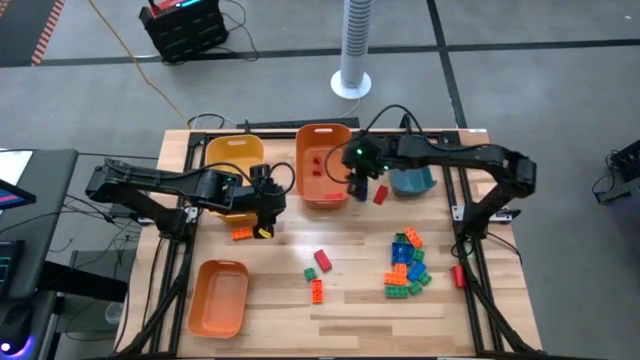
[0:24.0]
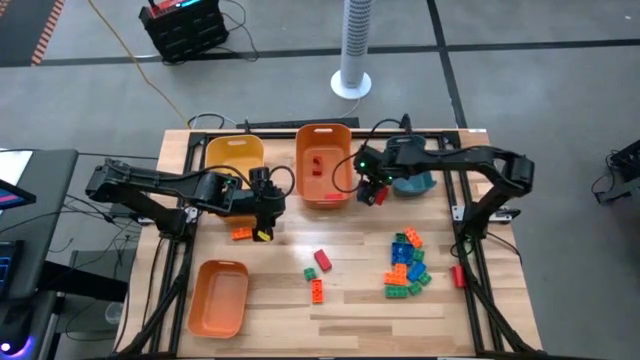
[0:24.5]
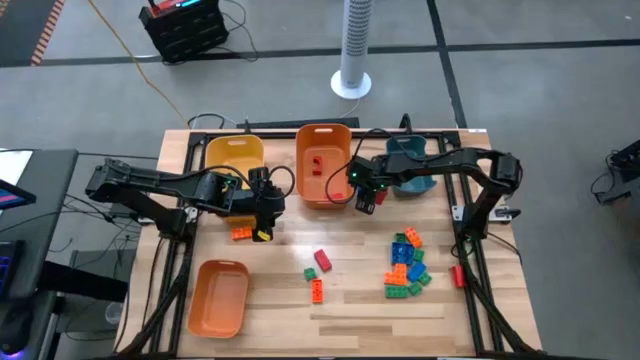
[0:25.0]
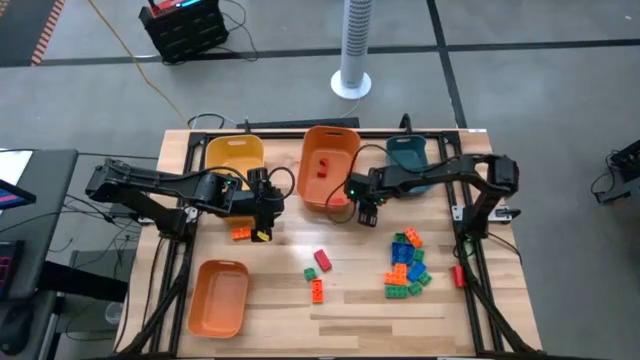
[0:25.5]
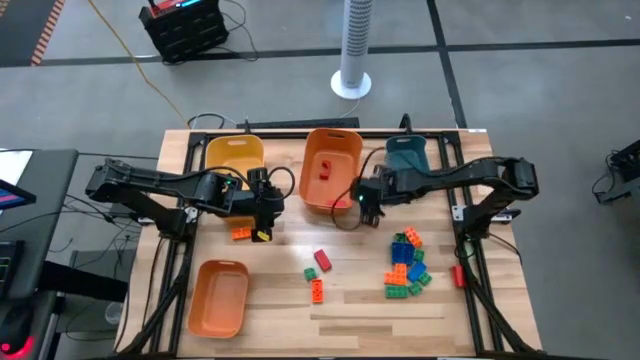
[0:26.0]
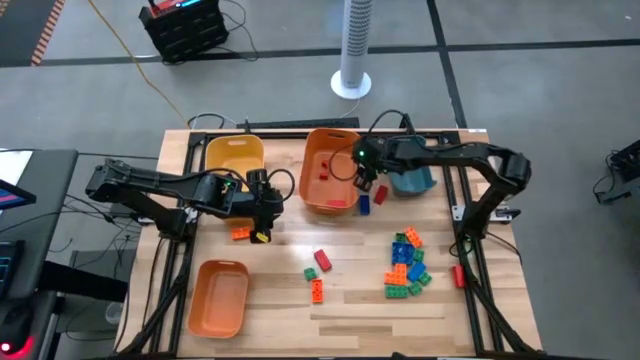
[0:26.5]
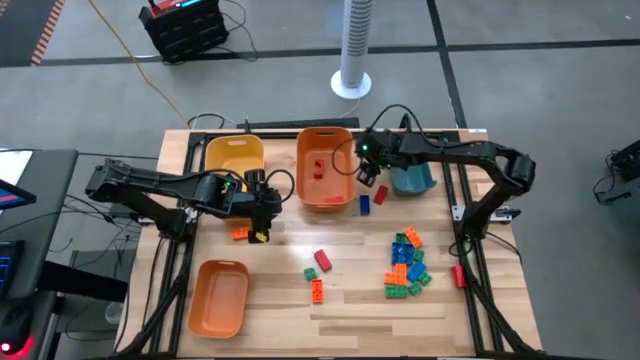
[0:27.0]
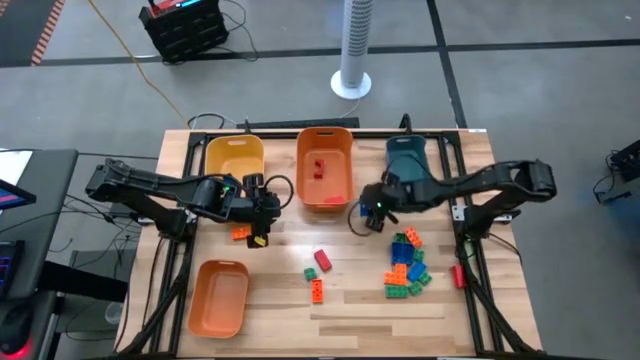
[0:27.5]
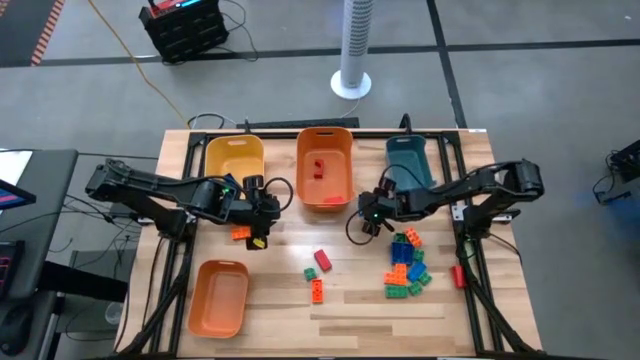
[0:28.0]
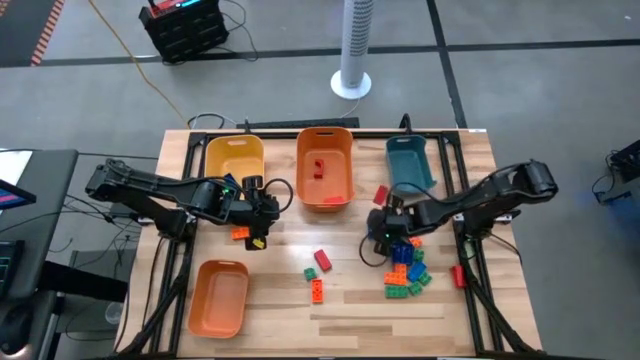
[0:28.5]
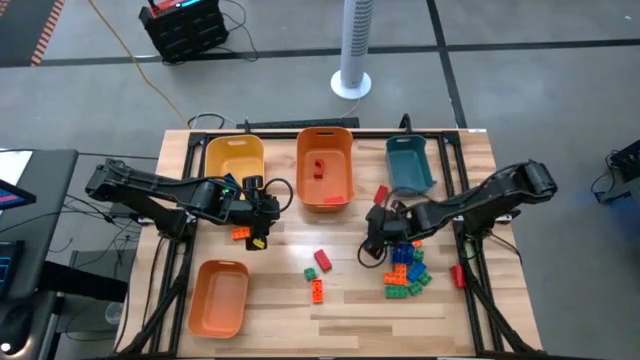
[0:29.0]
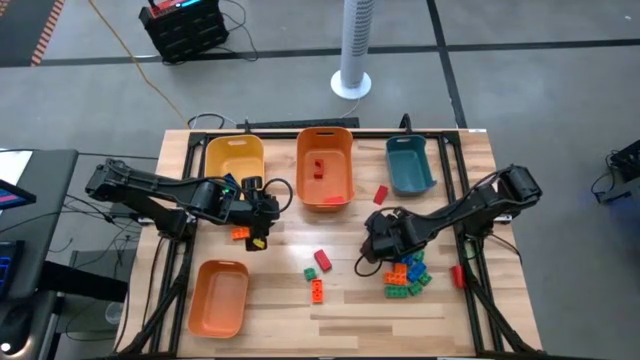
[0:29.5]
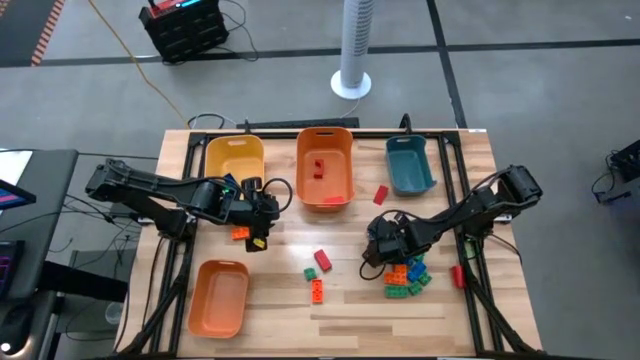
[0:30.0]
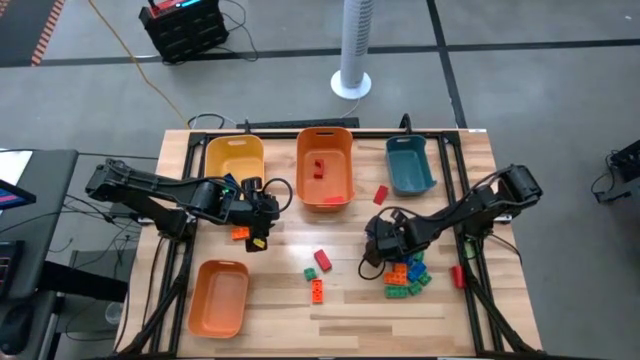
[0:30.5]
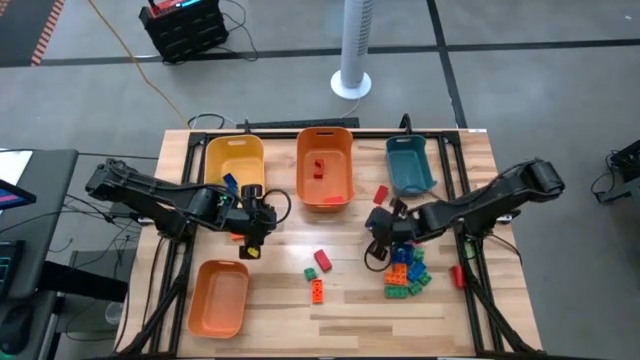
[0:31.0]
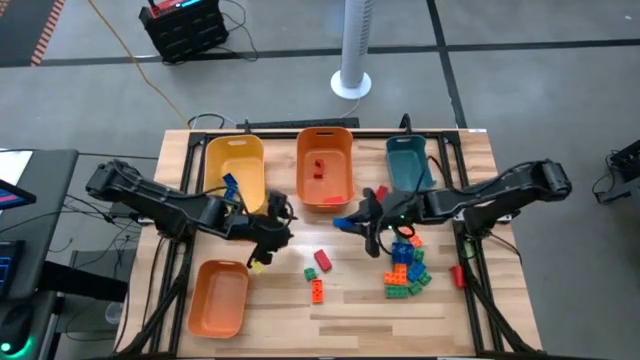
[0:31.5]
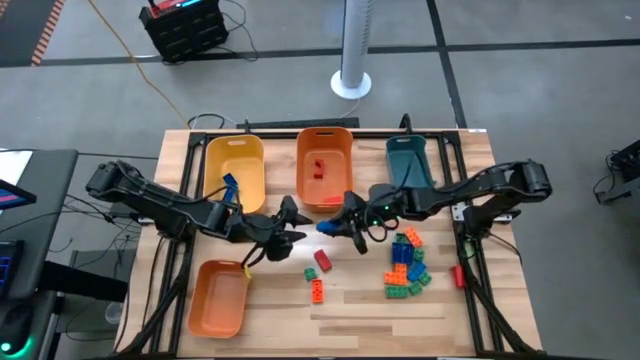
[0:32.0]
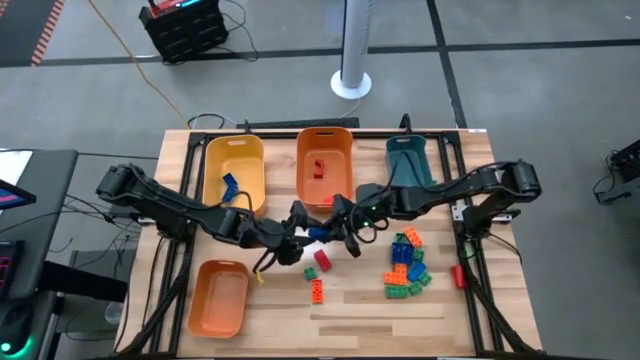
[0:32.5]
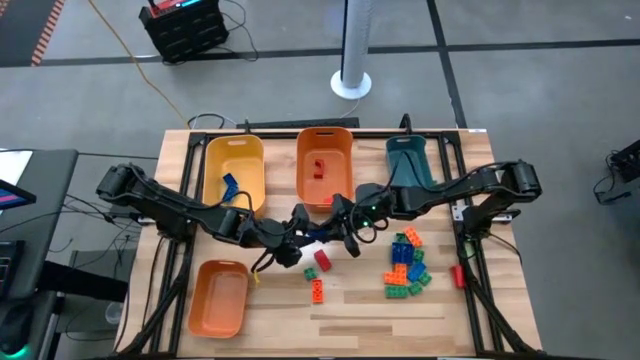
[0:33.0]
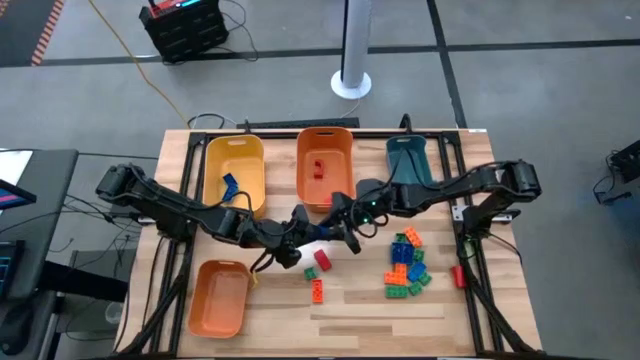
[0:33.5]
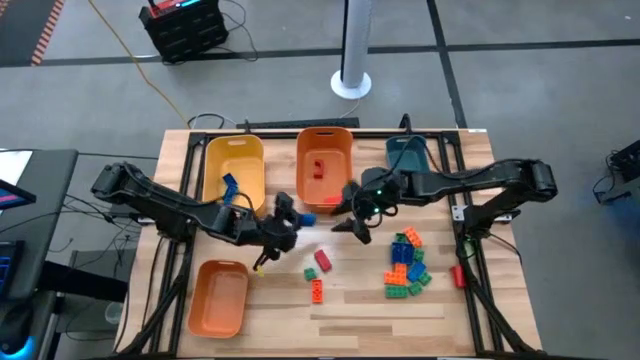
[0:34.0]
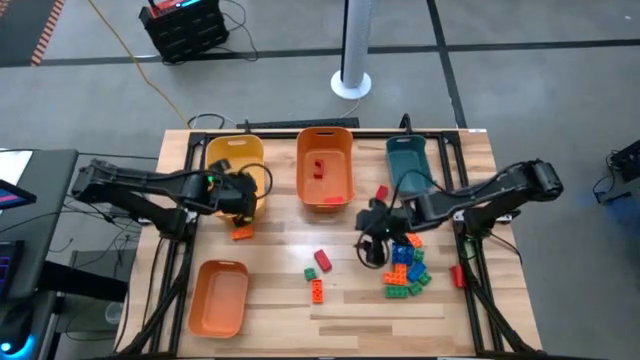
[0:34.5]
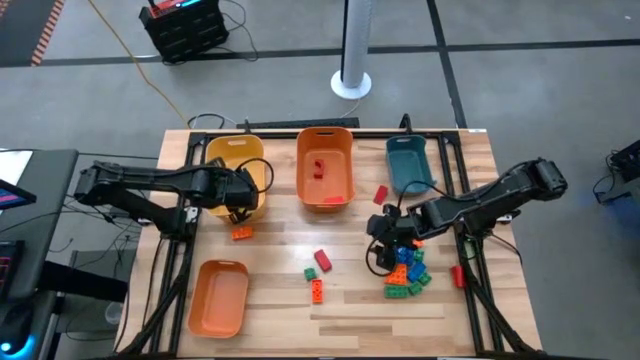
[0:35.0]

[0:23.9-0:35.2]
Task: Sort blocks
Put the blue game piece into the yellow bin

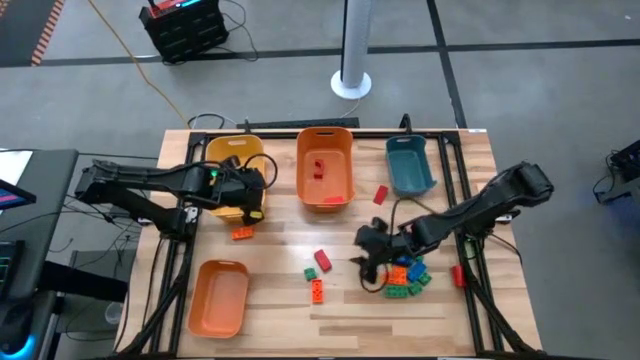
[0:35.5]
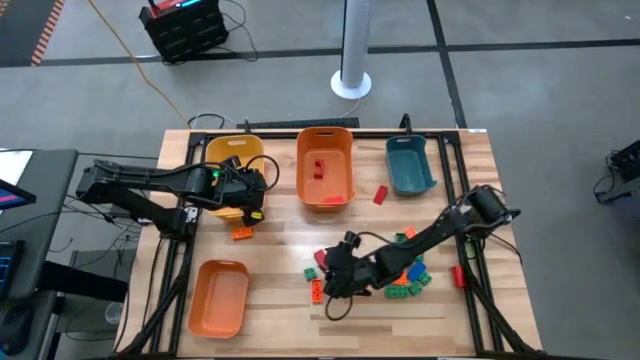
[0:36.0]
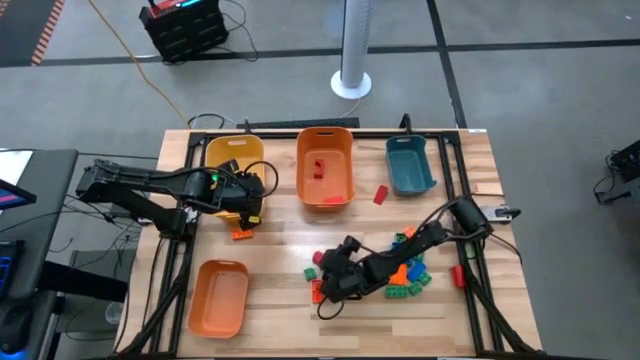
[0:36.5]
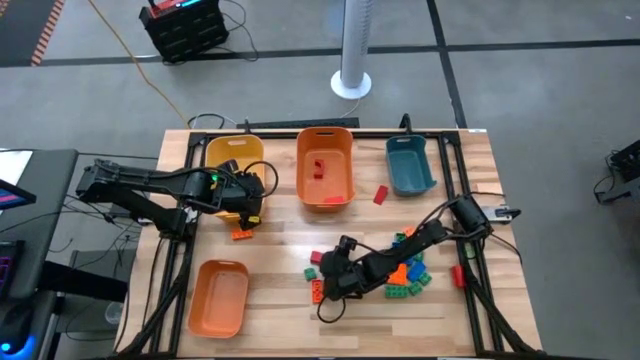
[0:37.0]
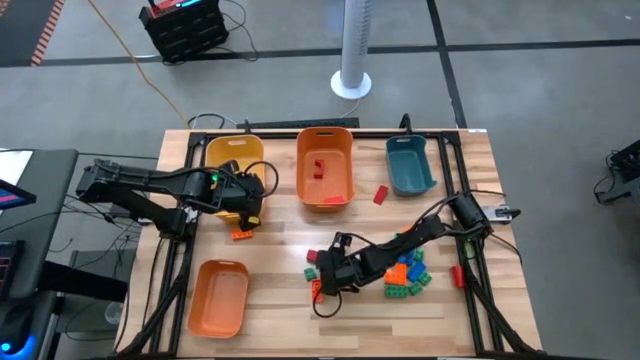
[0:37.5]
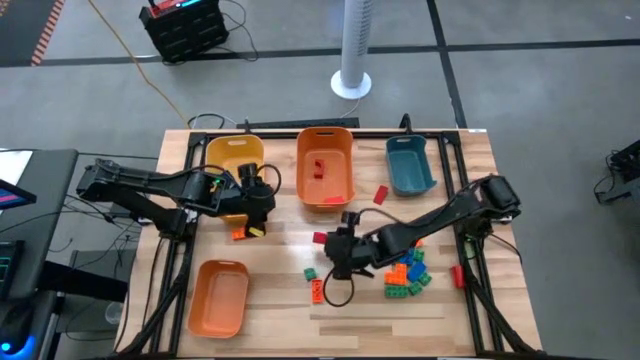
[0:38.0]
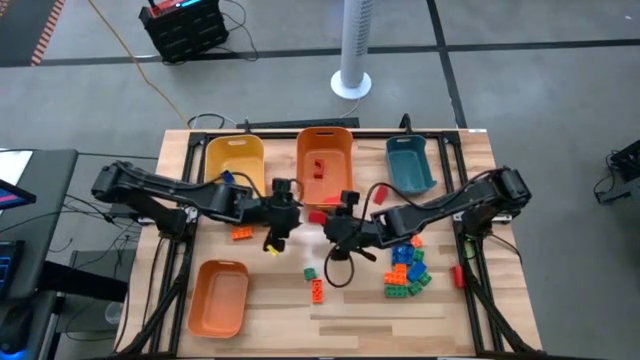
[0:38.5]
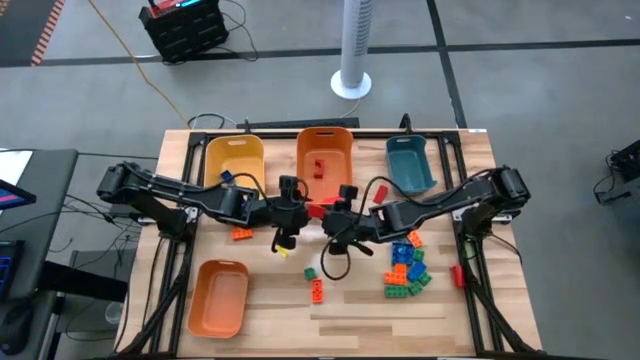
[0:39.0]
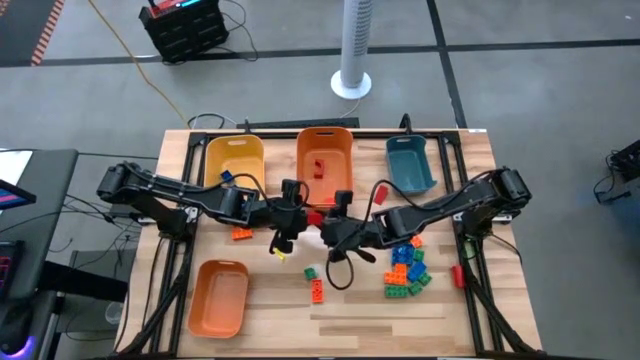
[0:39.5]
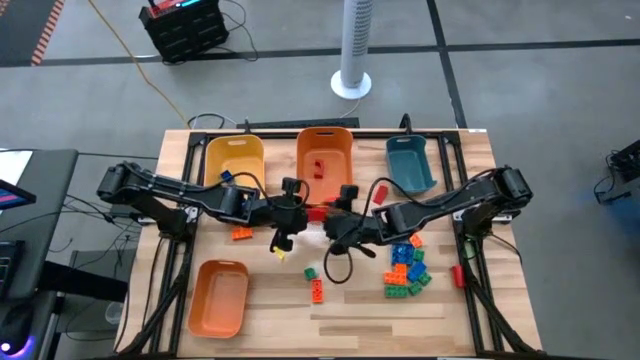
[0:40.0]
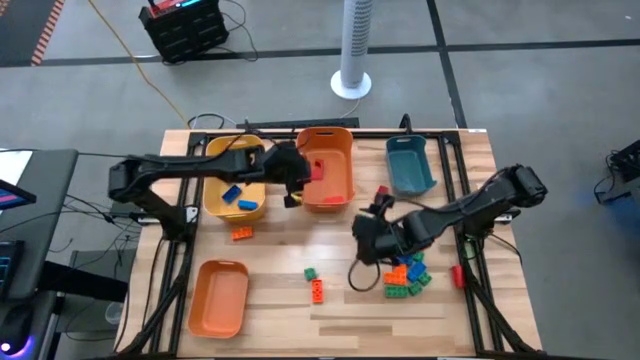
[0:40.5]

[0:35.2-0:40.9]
Put the red wooden block into the top orange bin

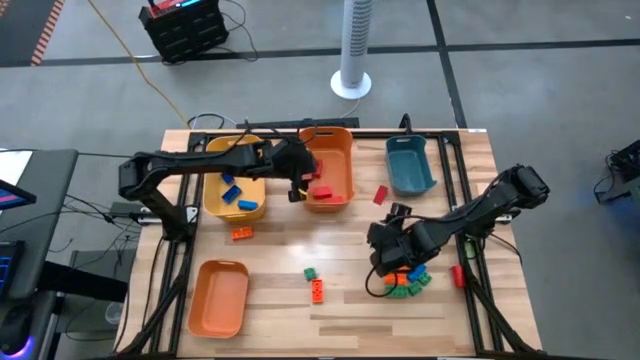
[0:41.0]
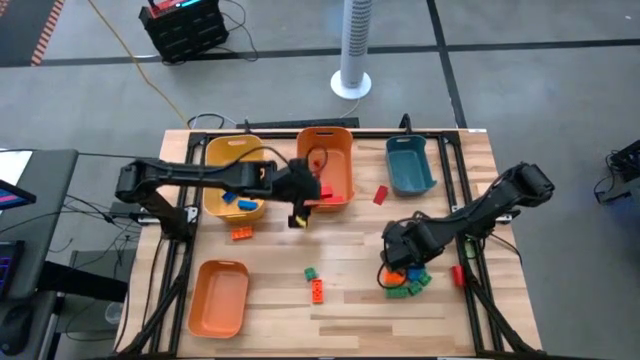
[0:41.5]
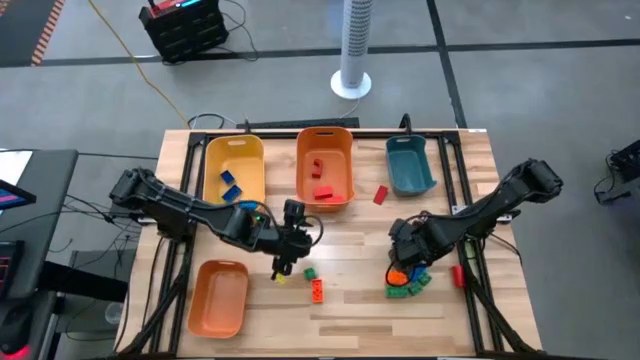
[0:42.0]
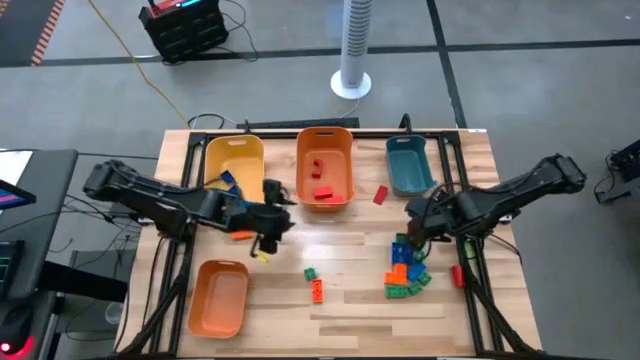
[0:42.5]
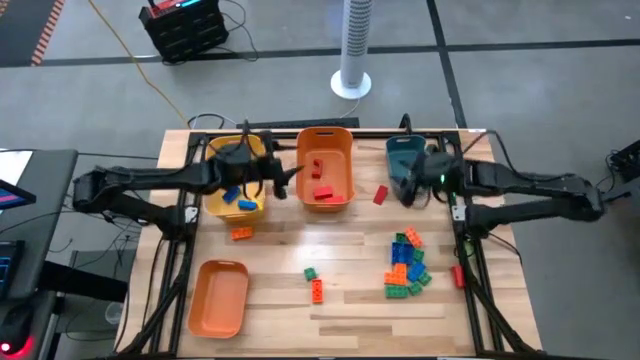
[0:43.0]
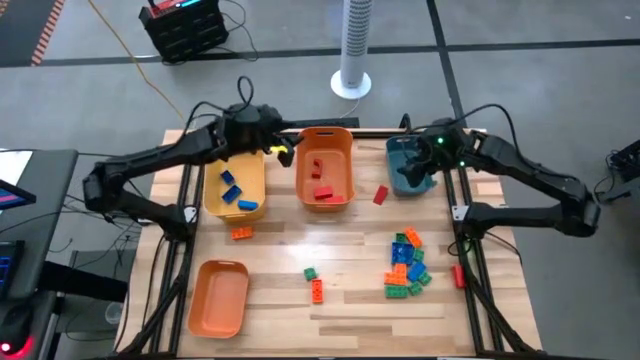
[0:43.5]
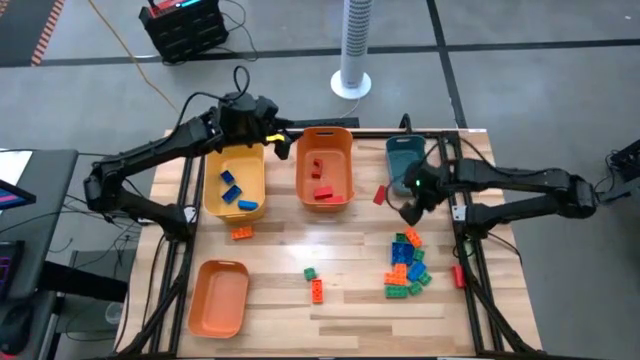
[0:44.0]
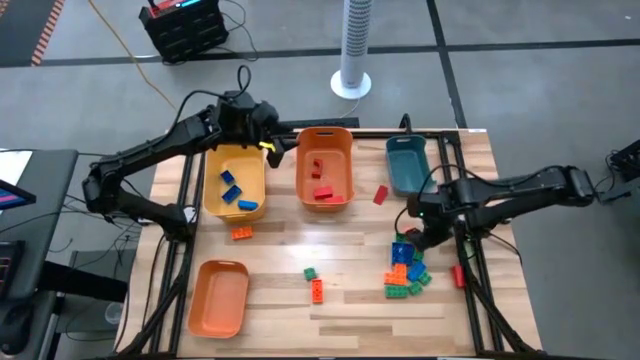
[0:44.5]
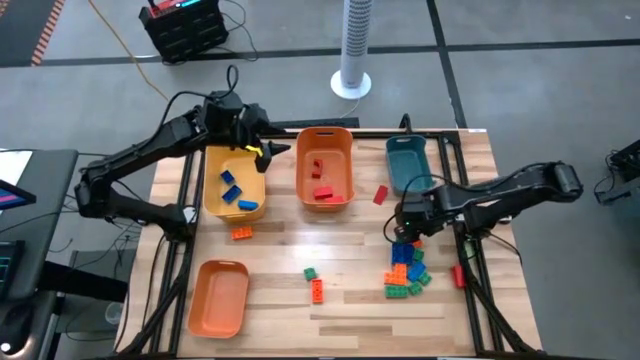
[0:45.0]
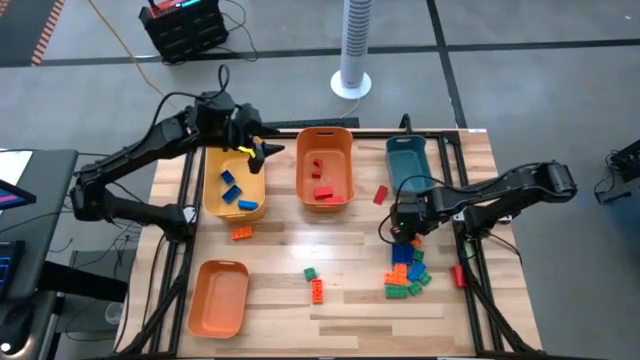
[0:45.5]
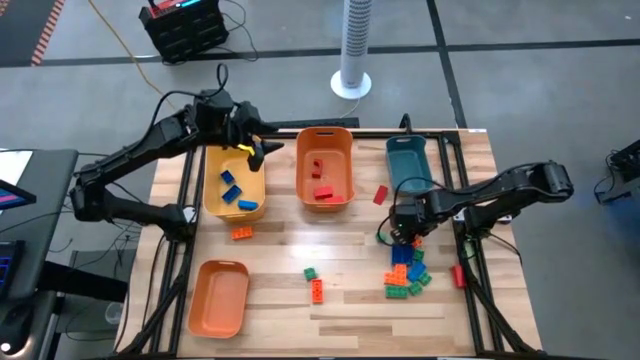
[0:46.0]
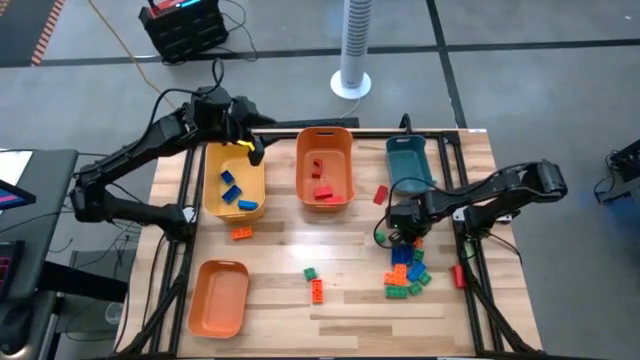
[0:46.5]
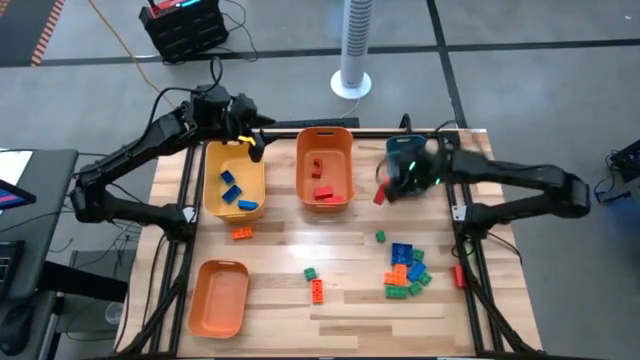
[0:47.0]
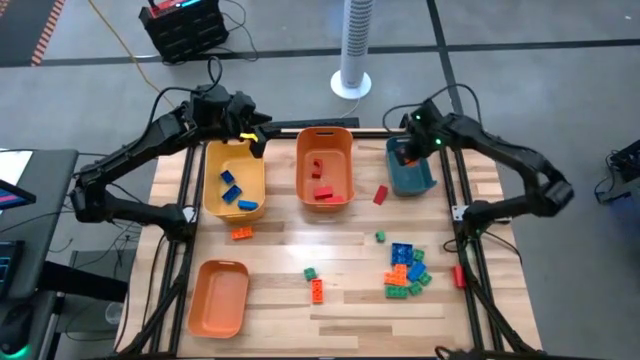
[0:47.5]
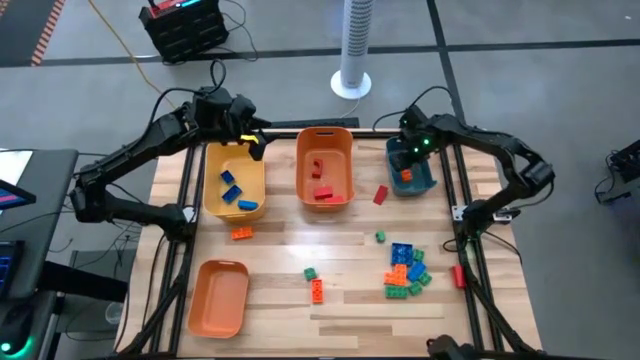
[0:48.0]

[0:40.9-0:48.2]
Put the orange game piece into the blue bin
